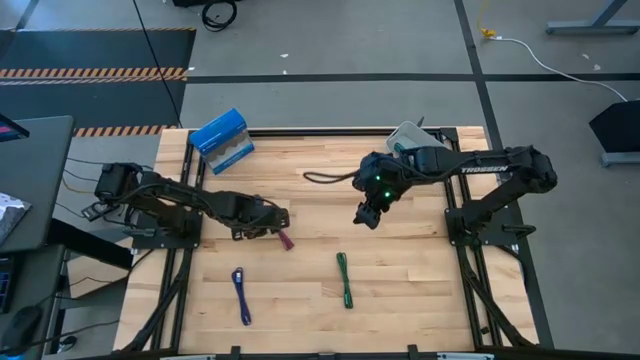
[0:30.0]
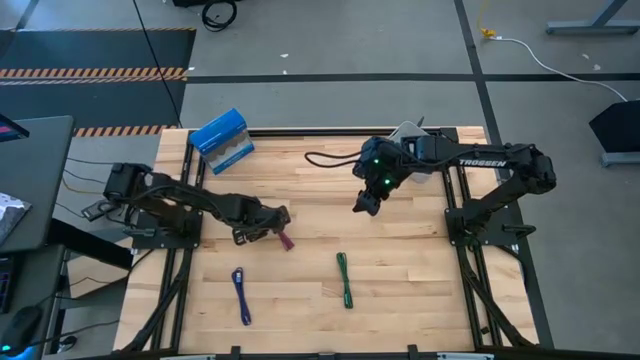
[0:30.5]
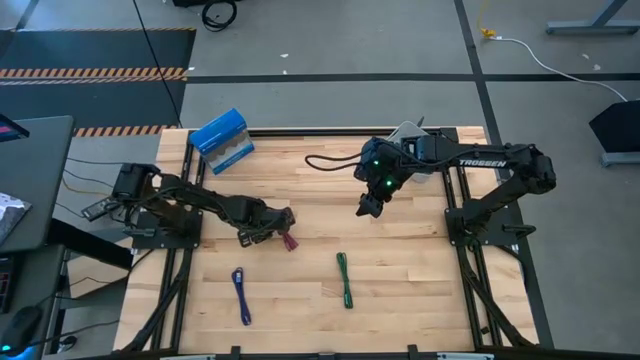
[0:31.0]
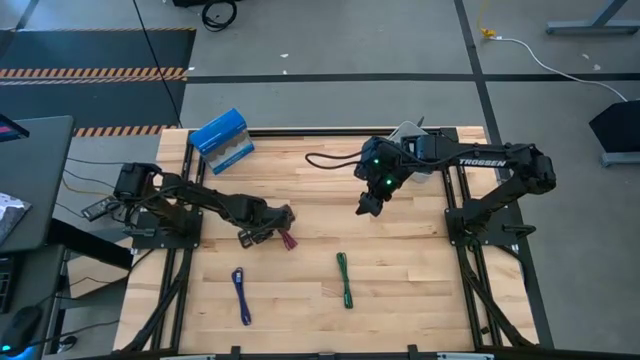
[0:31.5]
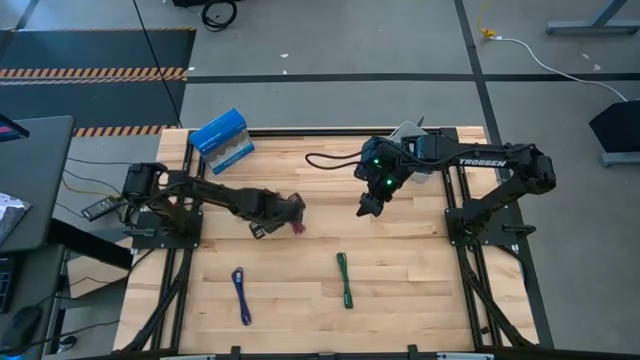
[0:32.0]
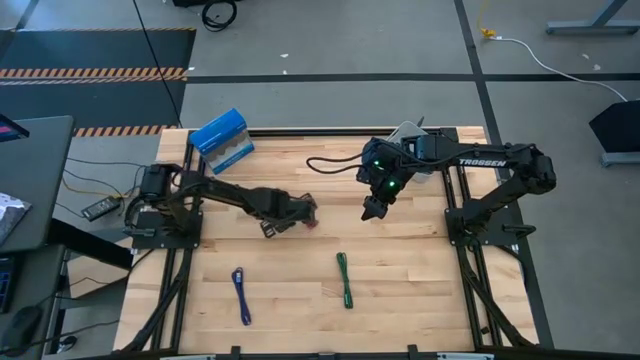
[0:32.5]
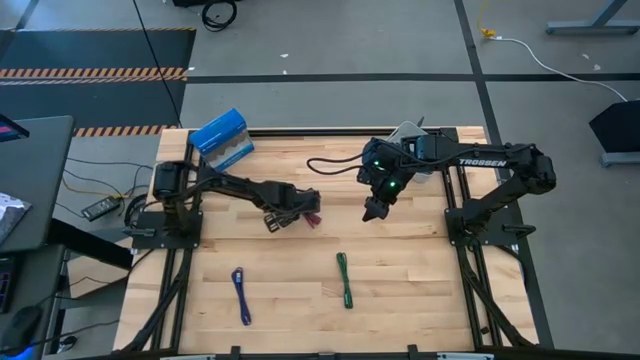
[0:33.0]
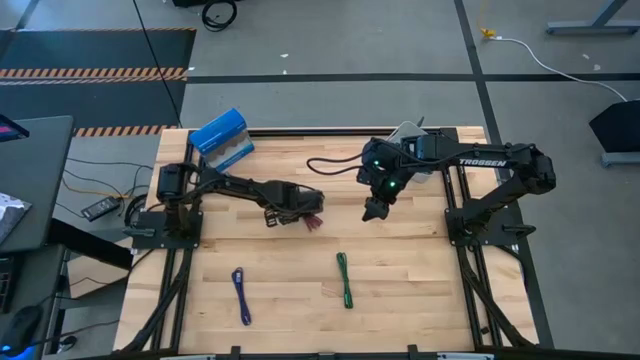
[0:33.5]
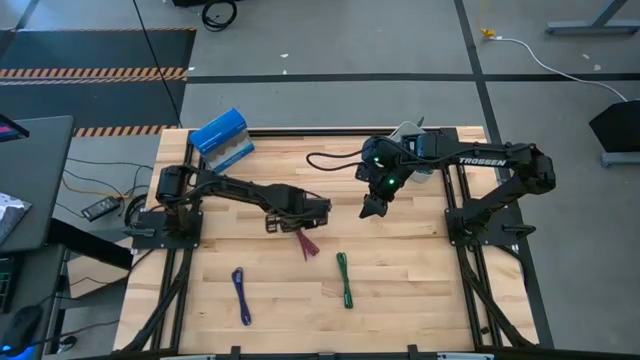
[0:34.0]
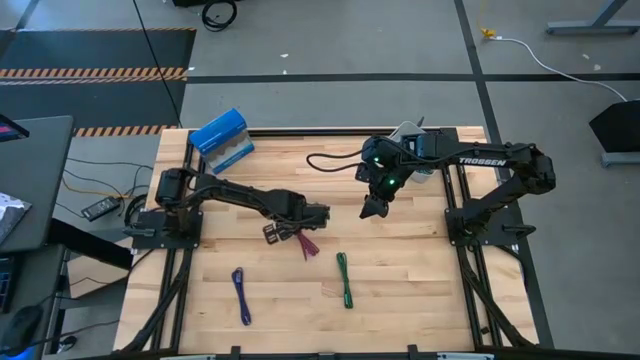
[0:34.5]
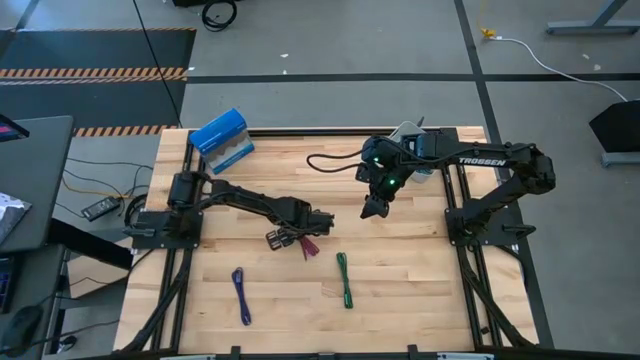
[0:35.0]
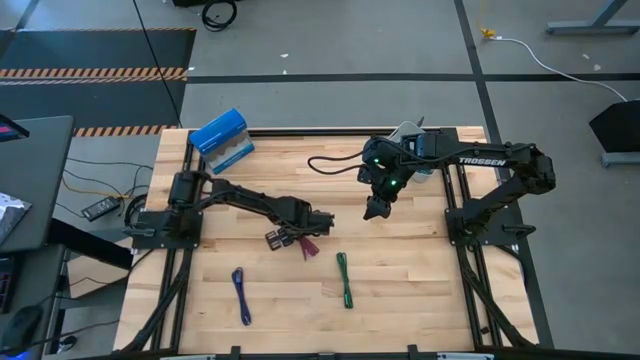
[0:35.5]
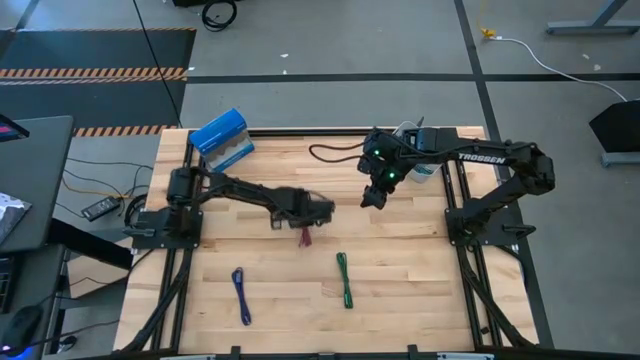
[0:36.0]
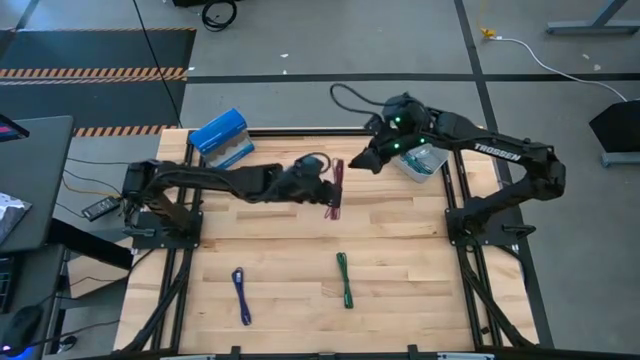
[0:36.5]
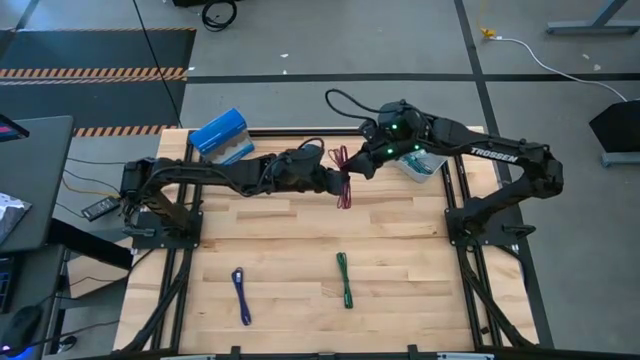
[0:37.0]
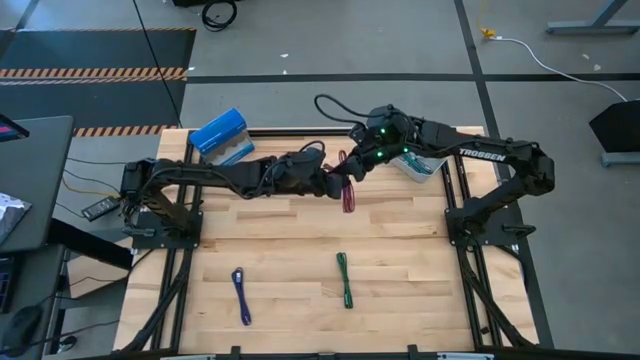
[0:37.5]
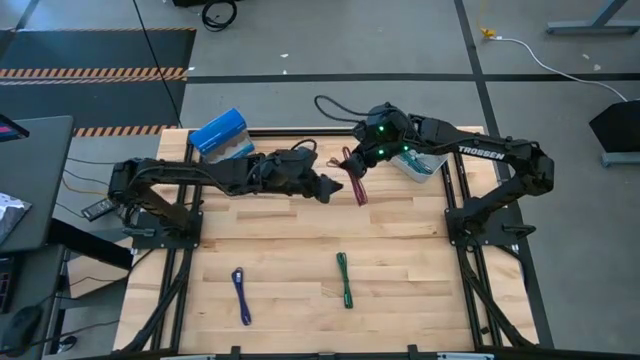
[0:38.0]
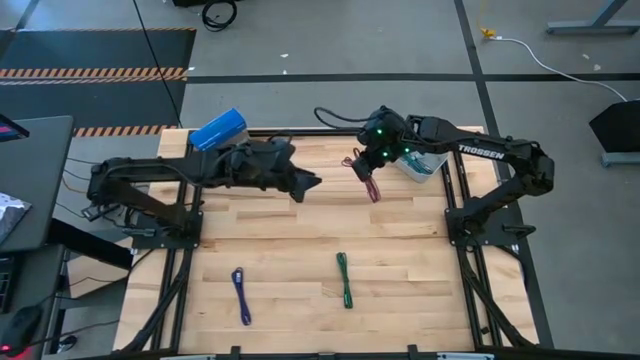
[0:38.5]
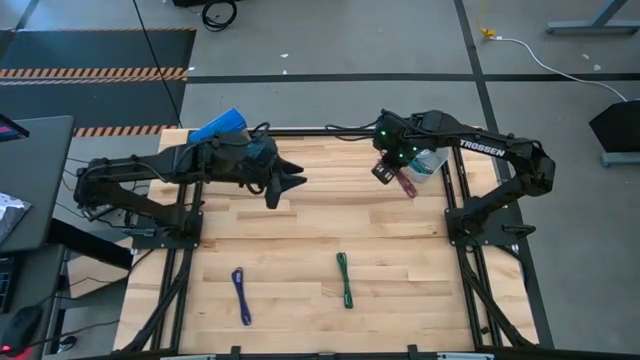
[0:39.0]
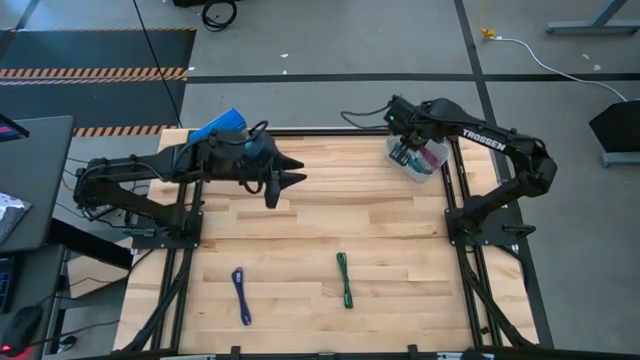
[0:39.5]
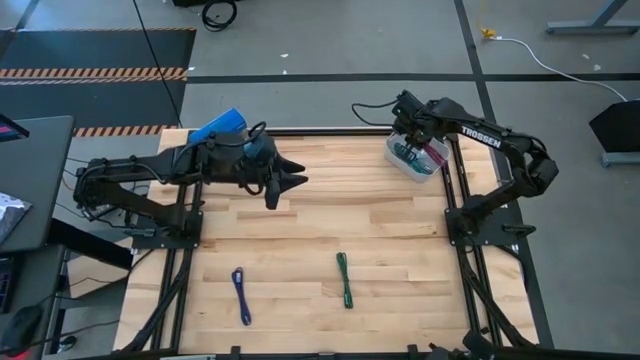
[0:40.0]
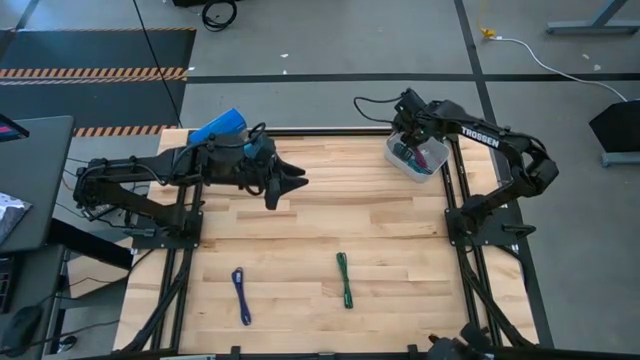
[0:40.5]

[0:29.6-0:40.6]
Task: Pick and place USB-C Cables
Put the ziptied light red USB charger cable into the bin

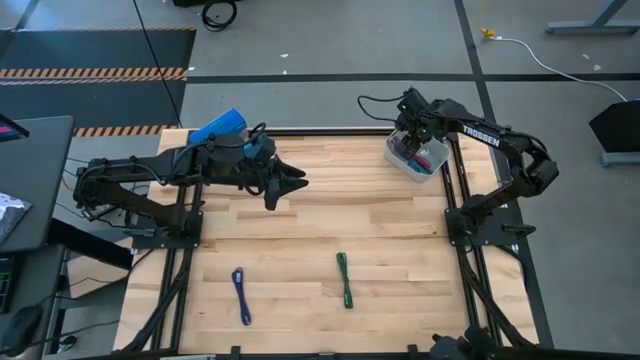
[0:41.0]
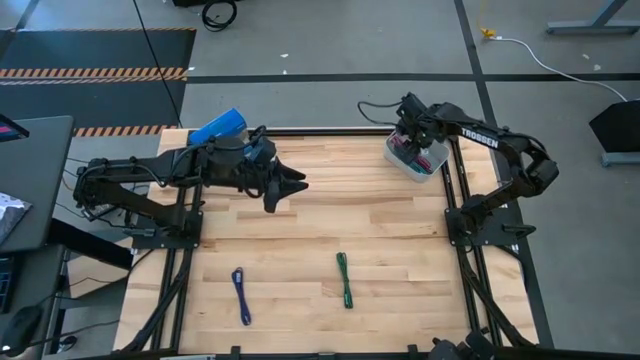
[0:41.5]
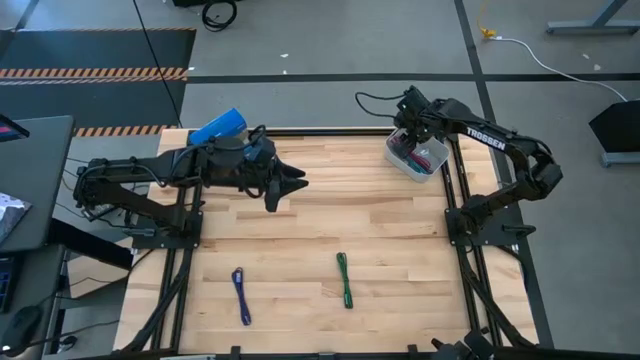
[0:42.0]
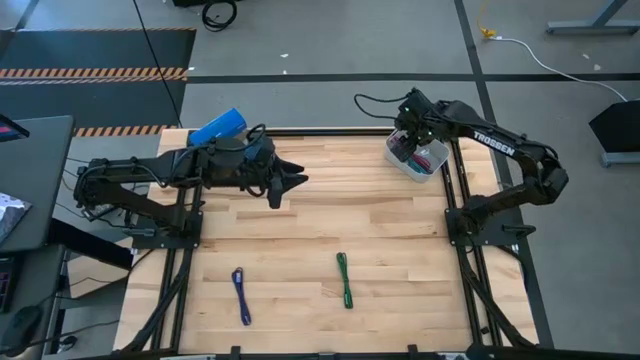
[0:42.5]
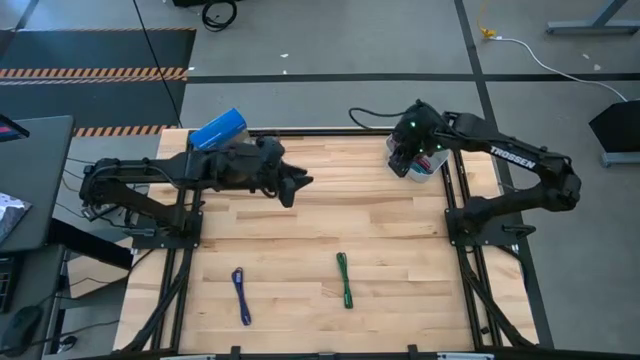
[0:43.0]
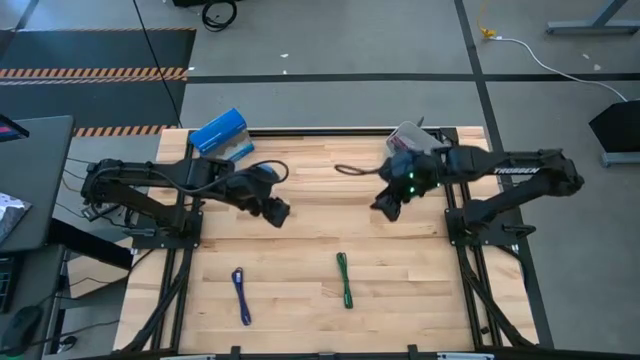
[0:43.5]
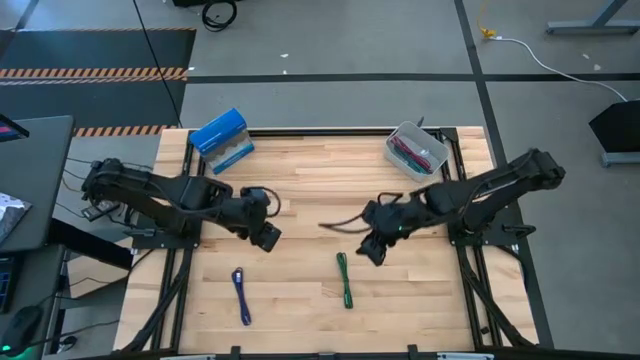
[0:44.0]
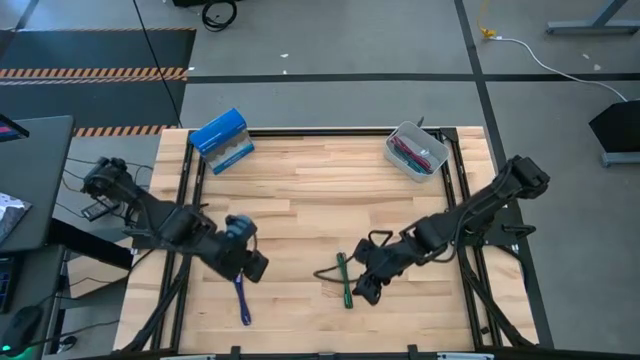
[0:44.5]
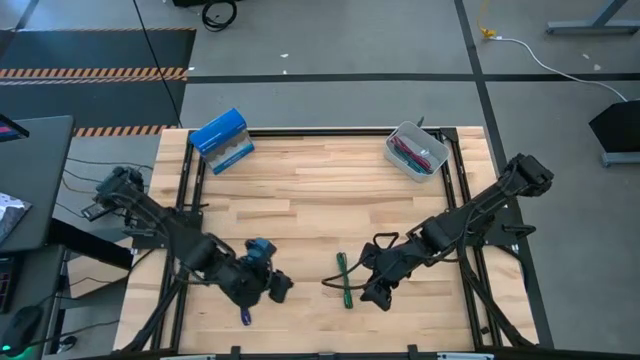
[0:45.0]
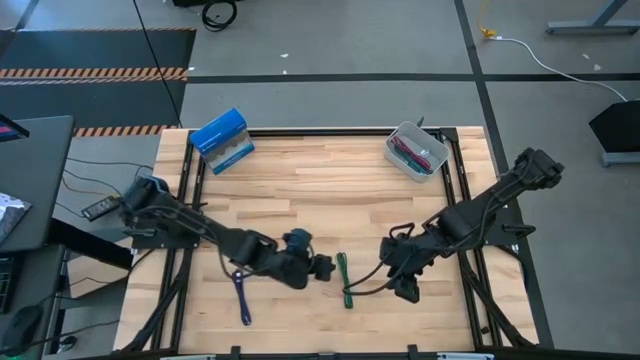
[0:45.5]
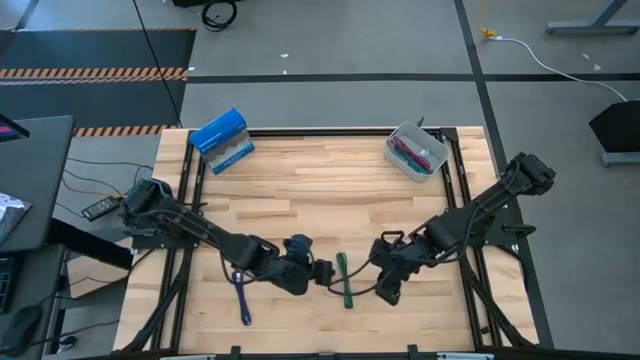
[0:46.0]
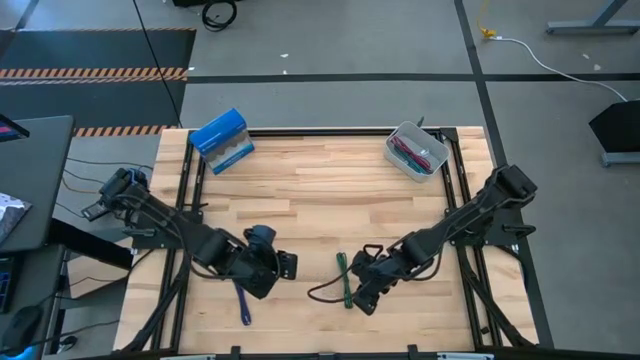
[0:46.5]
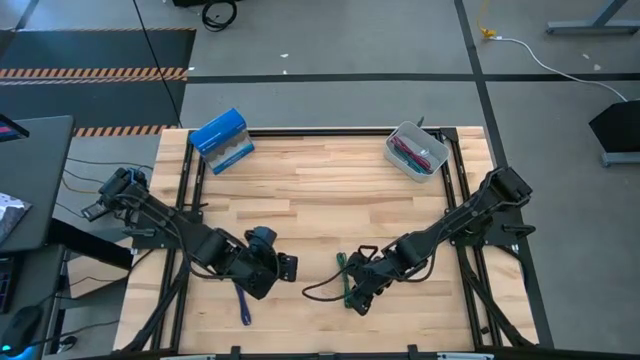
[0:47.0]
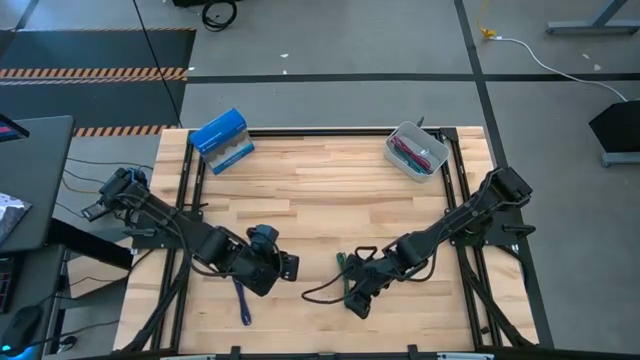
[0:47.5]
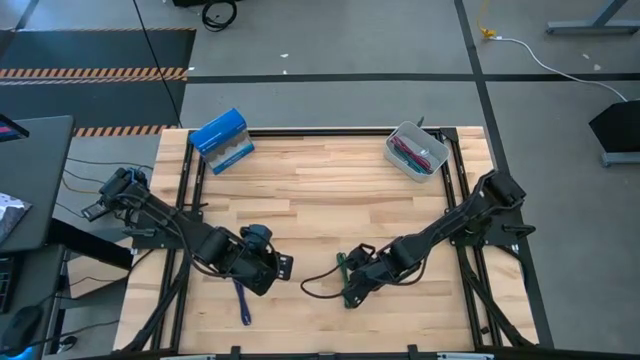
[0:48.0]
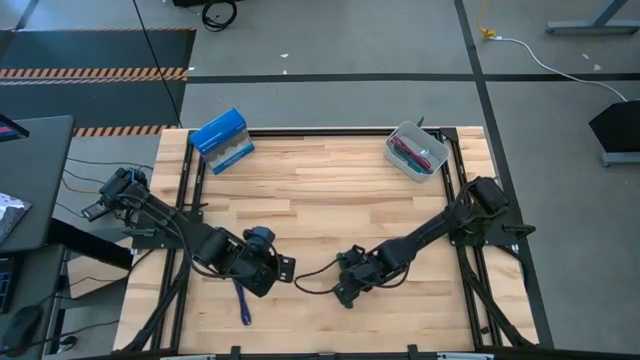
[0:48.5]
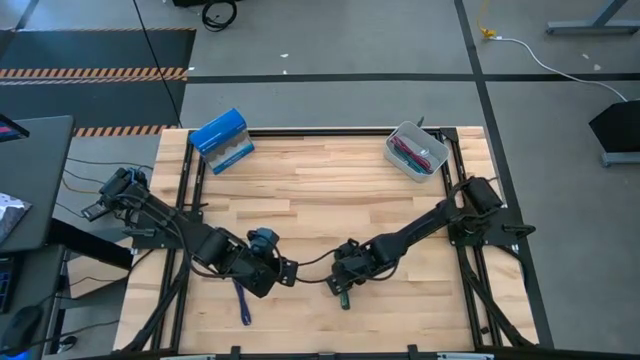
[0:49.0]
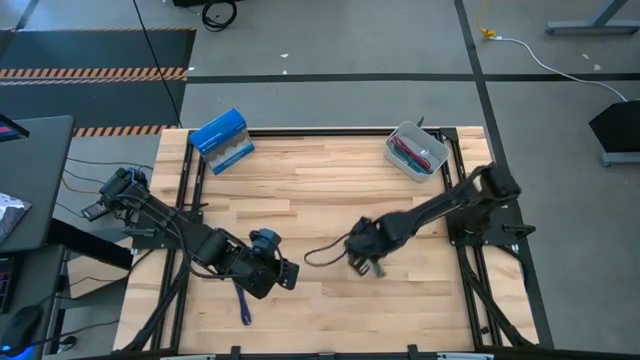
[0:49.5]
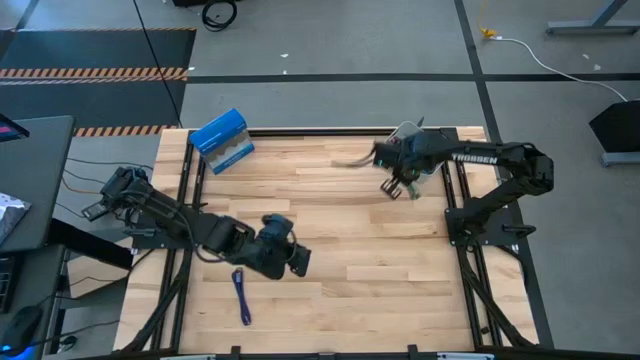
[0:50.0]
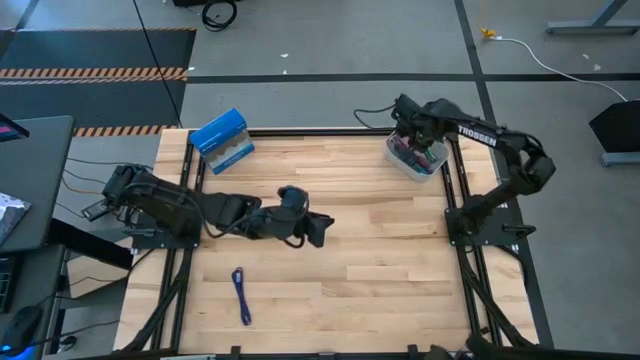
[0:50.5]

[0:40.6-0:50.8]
Put the ziptied green USB charger cable into the bin
